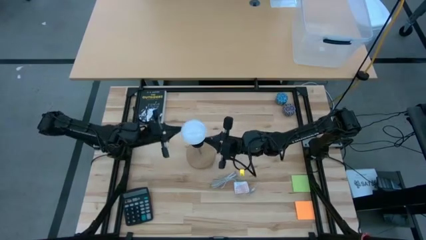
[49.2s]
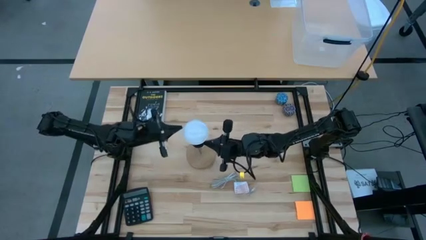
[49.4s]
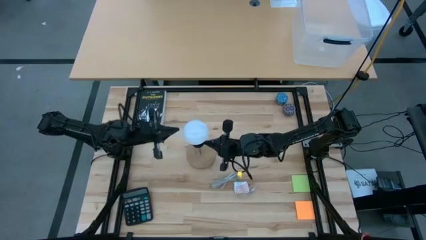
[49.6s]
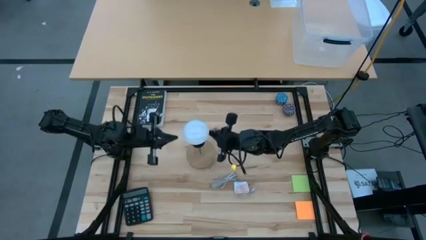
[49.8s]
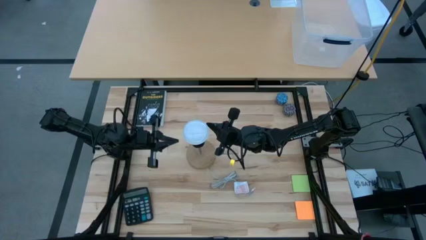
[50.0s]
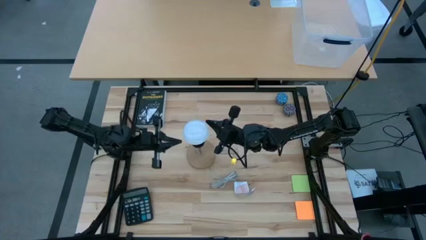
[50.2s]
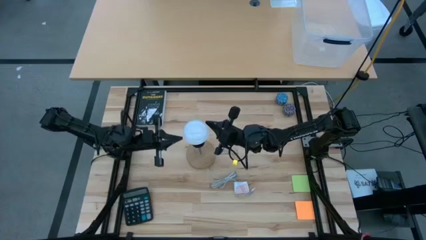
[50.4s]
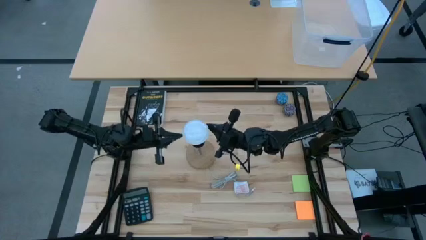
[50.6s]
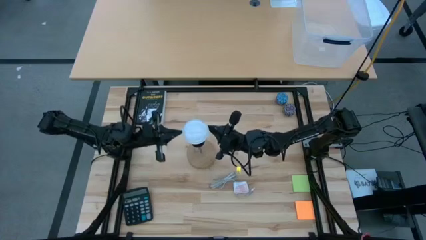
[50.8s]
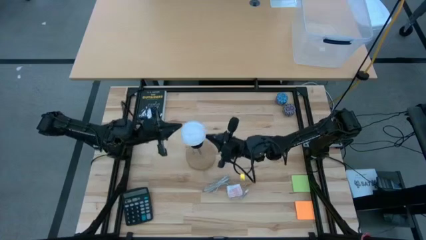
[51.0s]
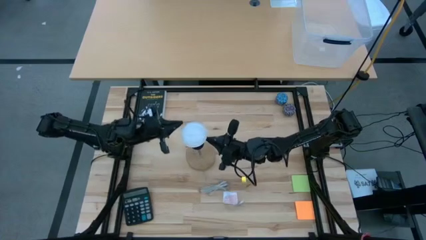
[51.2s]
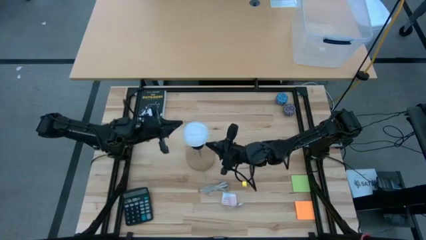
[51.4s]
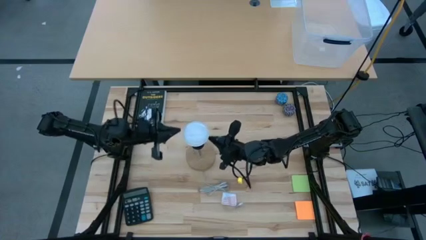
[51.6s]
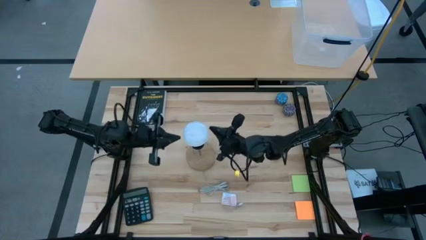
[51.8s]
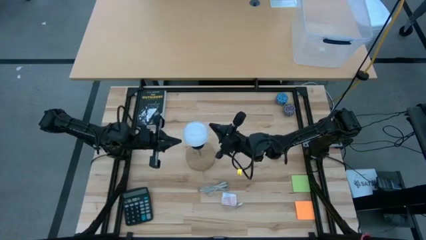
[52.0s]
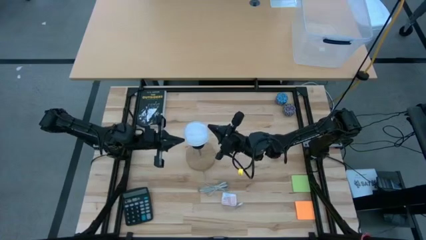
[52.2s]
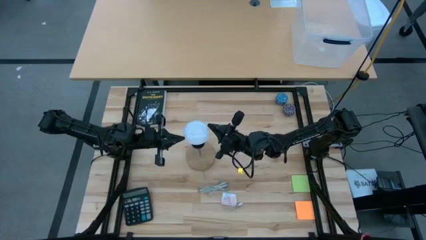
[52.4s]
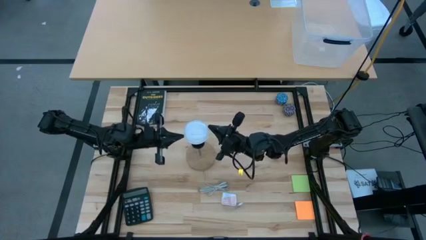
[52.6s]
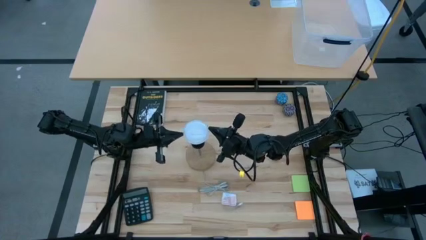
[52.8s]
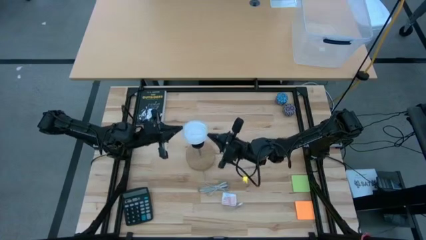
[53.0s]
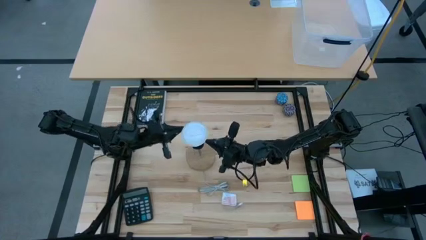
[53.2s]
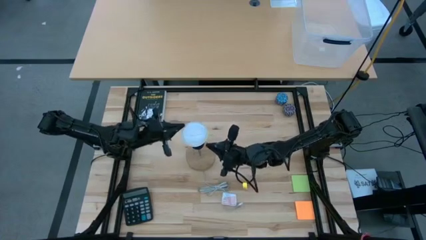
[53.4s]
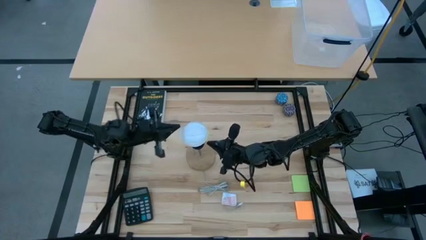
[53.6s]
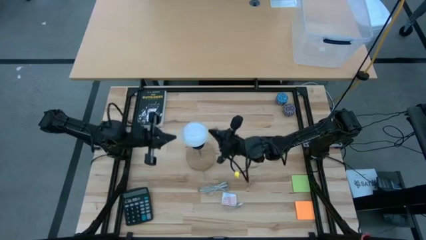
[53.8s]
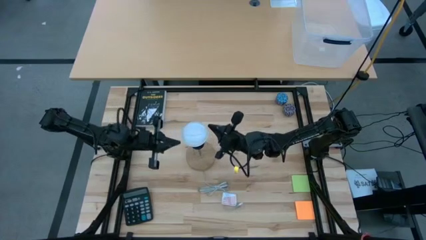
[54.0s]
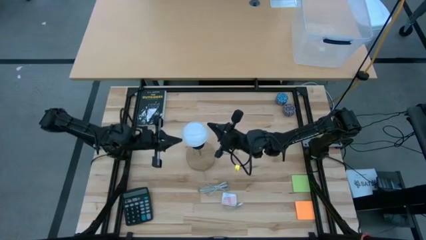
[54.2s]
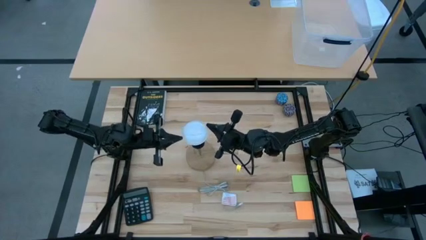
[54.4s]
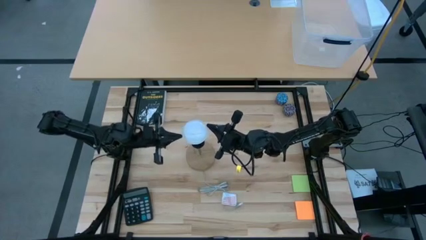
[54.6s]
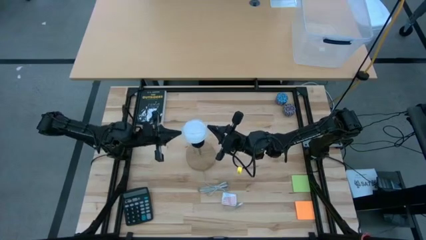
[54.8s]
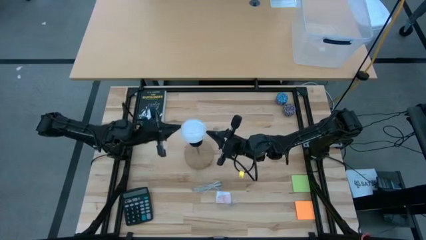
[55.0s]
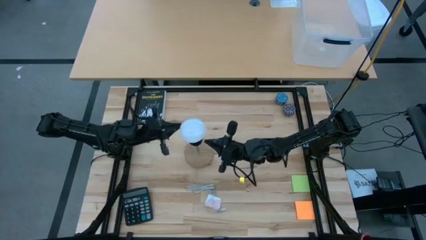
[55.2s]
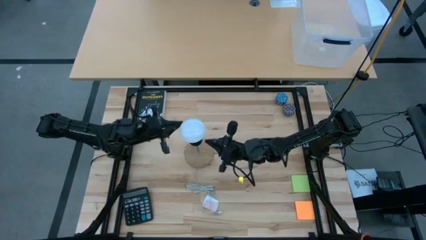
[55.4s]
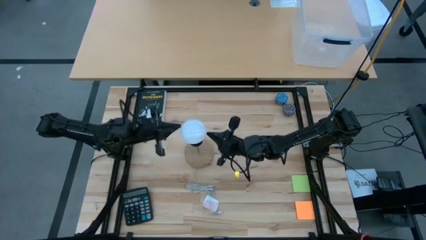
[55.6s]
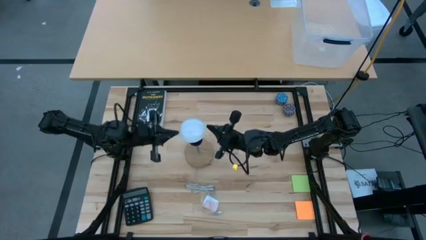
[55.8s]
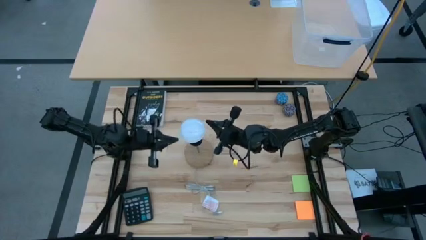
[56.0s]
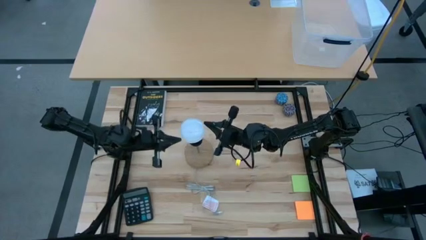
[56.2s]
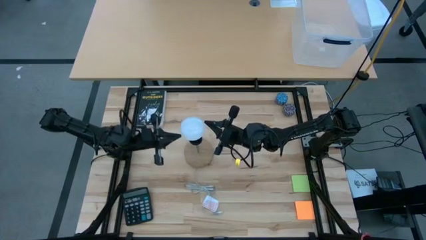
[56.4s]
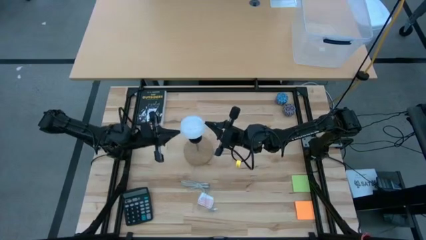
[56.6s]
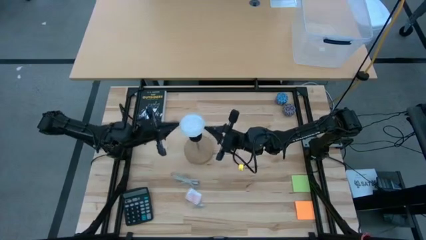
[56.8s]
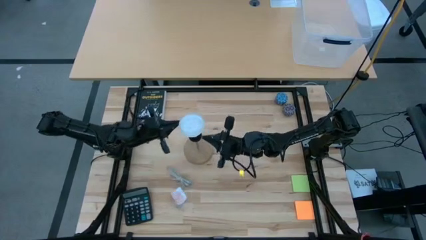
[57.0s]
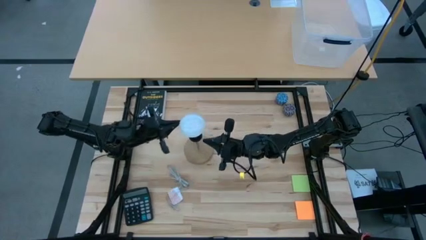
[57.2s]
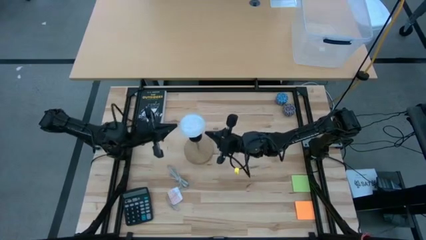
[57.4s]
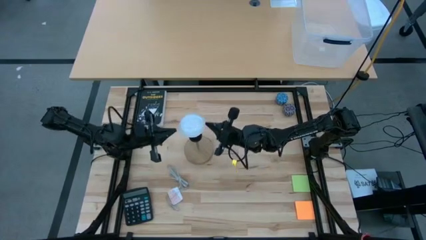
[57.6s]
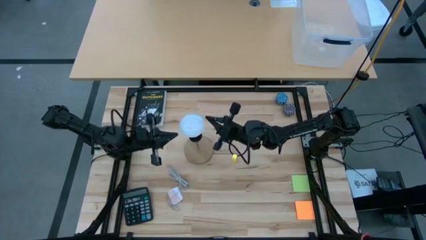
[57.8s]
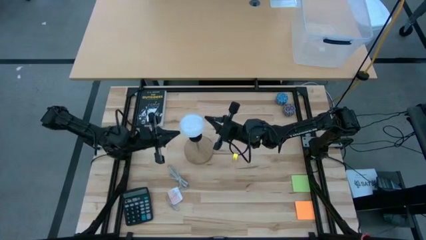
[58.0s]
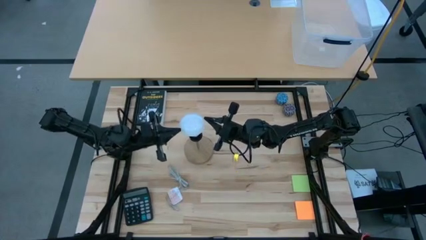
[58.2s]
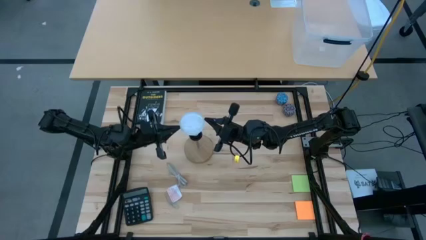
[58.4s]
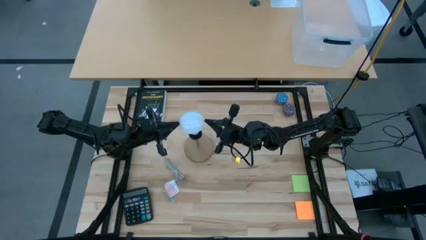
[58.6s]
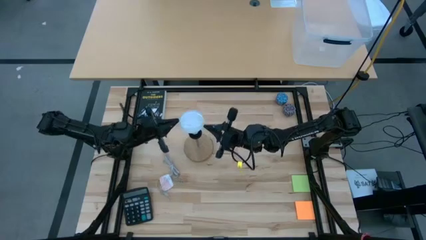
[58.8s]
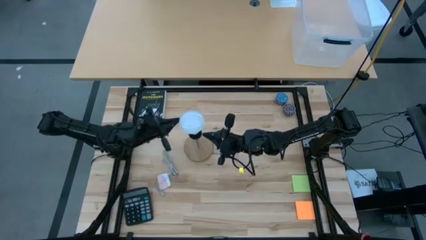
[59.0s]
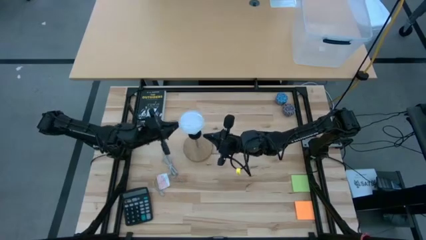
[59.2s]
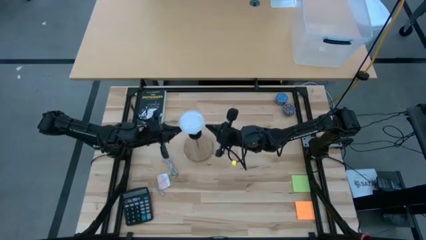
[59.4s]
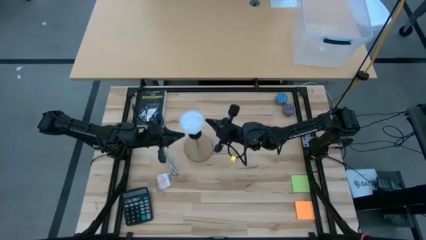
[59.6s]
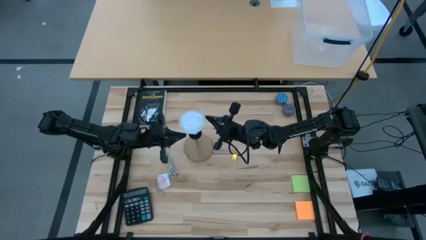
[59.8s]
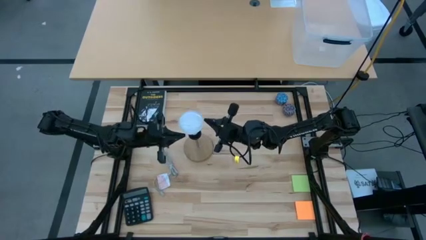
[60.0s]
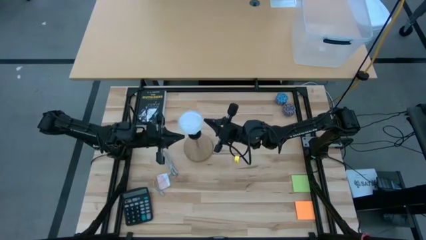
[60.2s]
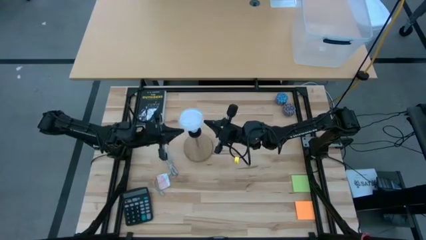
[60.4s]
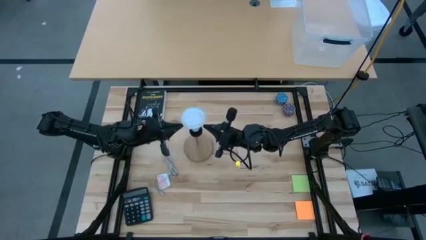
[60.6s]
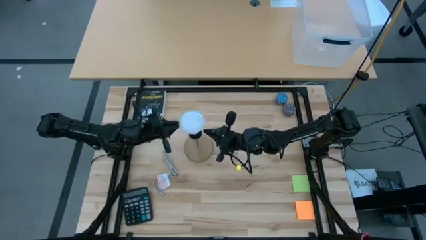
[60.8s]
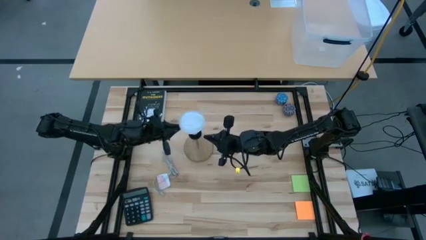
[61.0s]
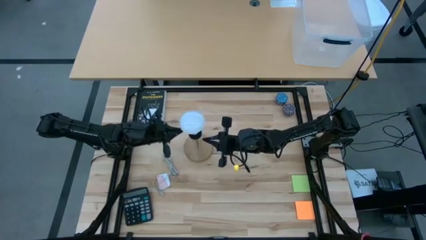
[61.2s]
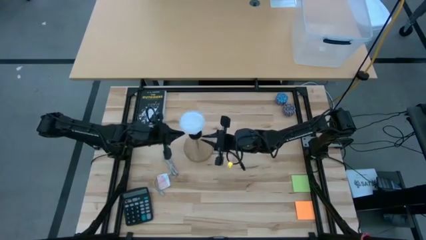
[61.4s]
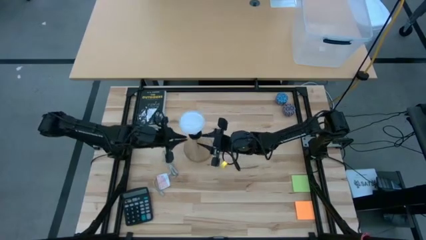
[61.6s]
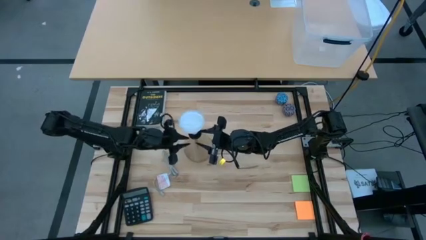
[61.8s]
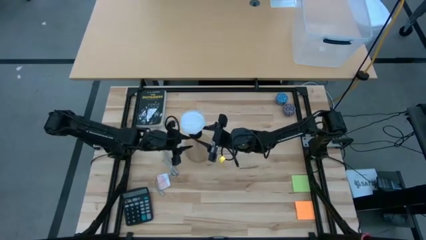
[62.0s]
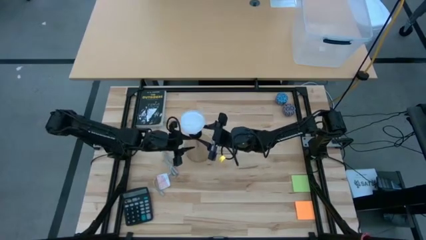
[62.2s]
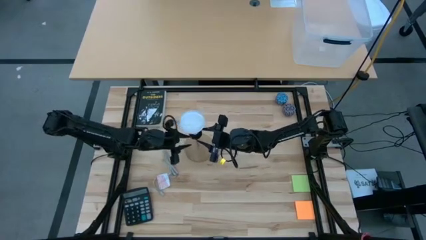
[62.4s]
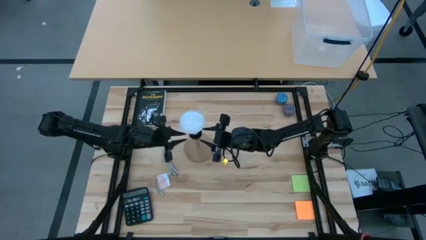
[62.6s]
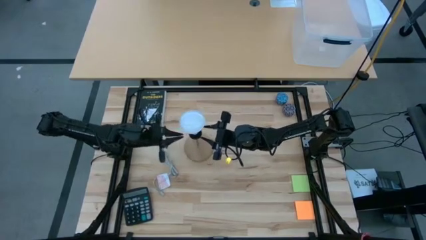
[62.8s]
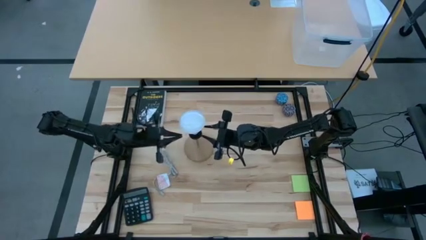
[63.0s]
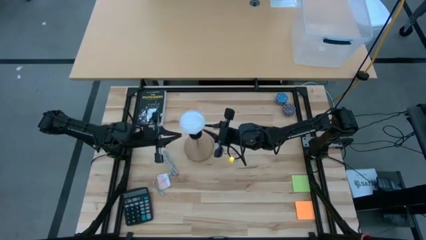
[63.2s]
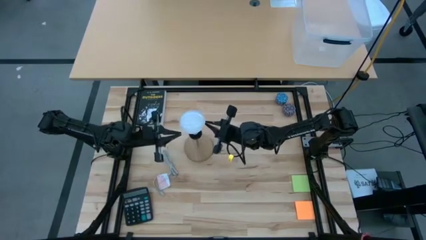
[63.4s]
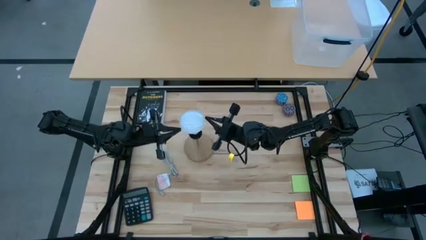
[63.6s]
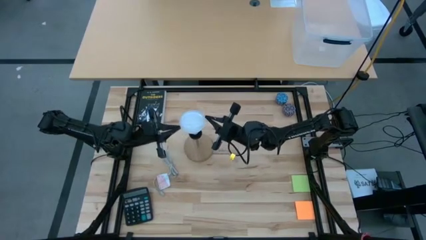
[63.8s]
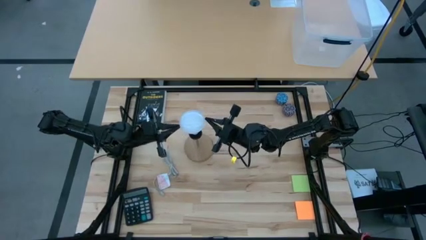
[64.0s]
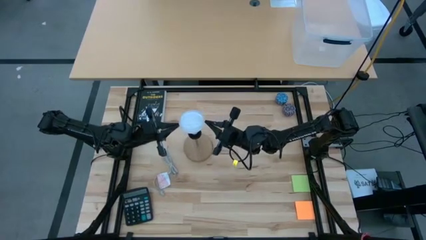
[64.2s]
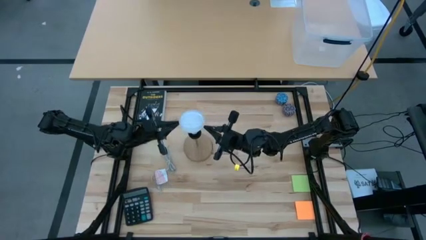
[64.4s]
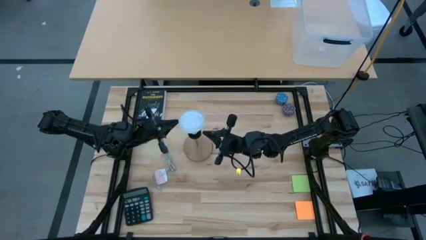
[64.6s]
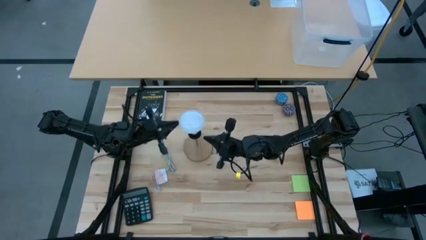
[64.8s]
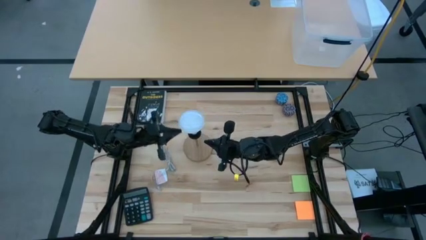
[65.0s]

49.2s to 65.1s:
Task: Screw lightbulb
Insert the lightbulb into the lamp socket
